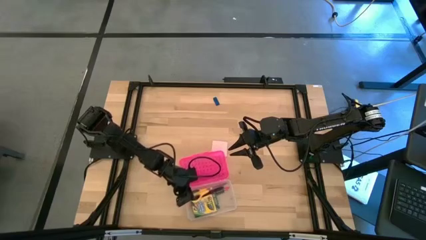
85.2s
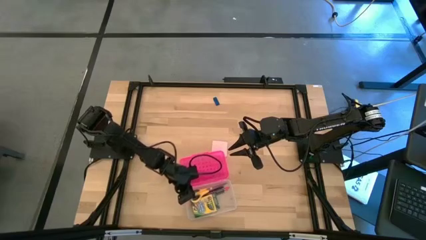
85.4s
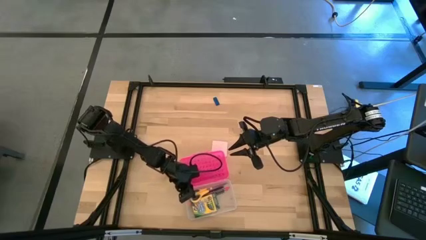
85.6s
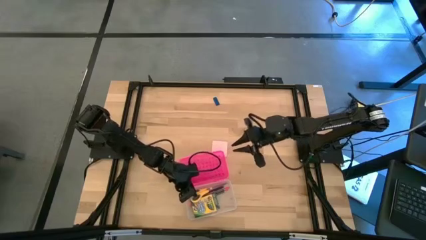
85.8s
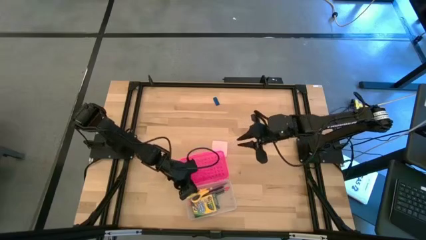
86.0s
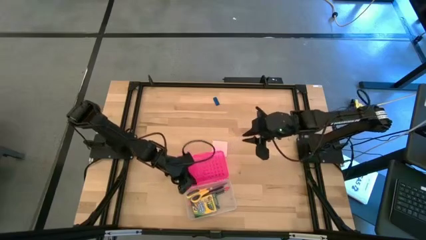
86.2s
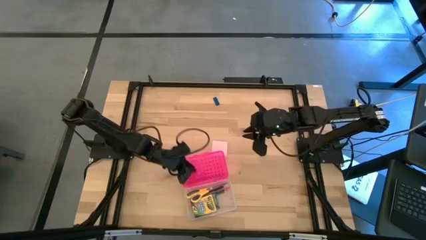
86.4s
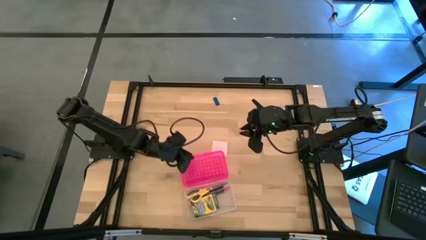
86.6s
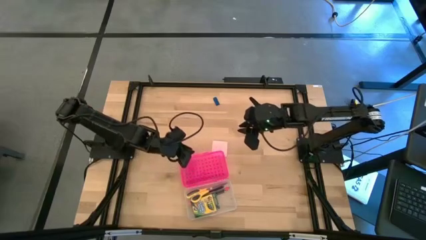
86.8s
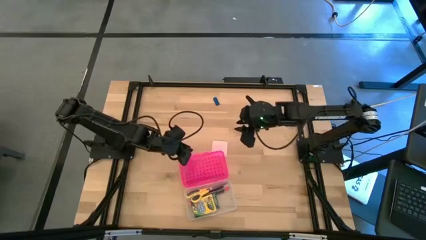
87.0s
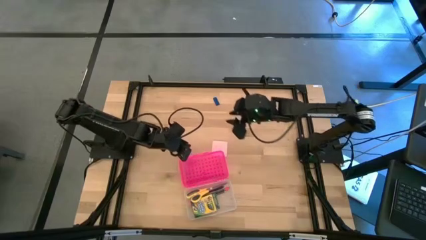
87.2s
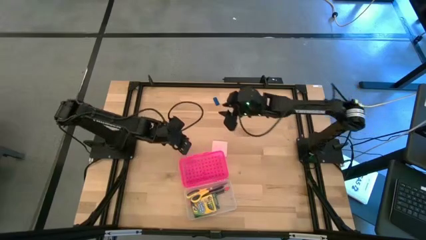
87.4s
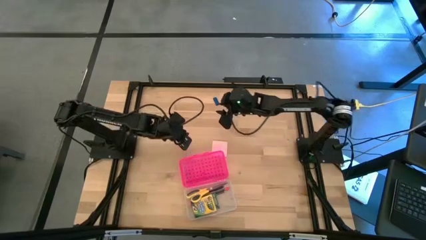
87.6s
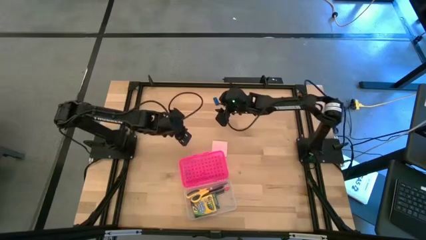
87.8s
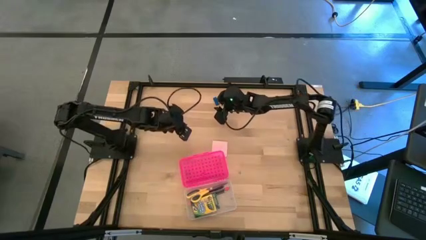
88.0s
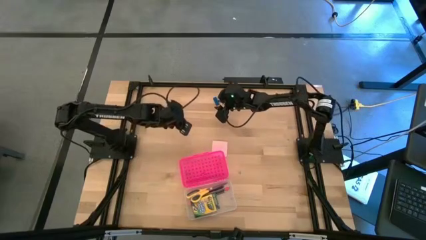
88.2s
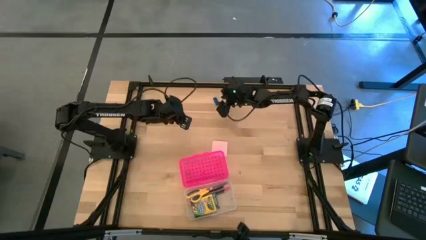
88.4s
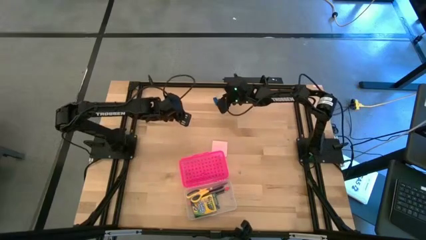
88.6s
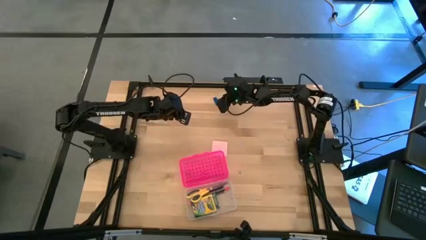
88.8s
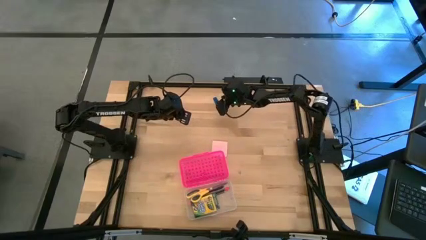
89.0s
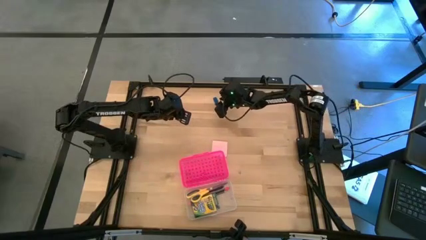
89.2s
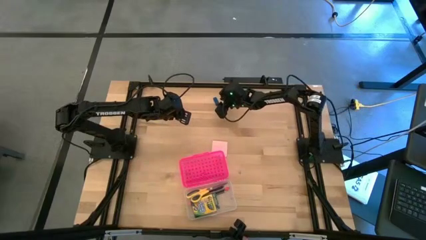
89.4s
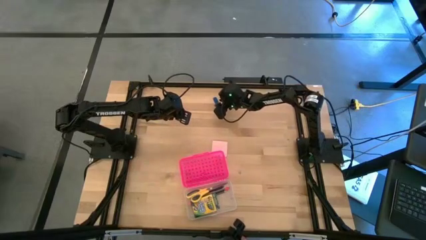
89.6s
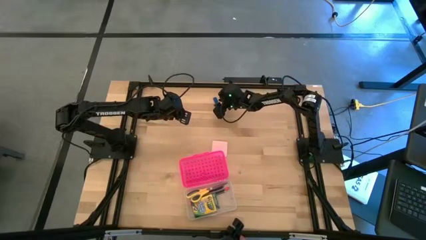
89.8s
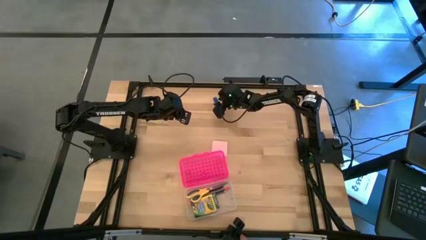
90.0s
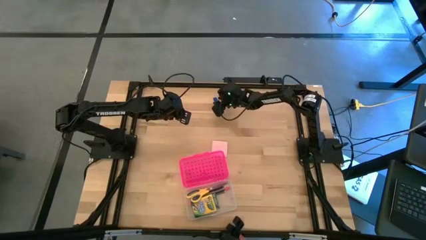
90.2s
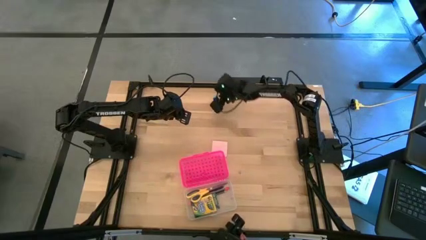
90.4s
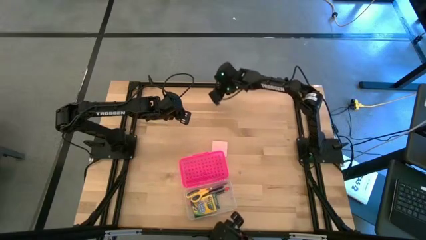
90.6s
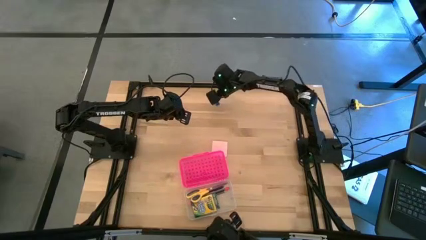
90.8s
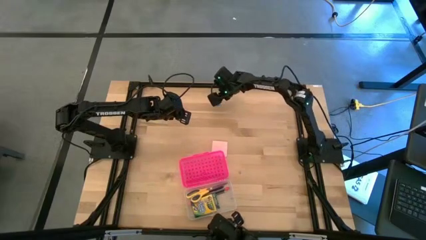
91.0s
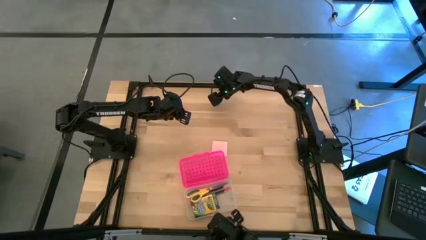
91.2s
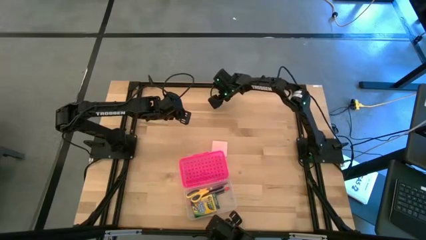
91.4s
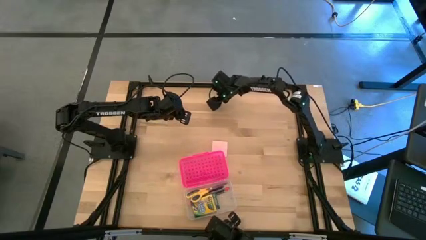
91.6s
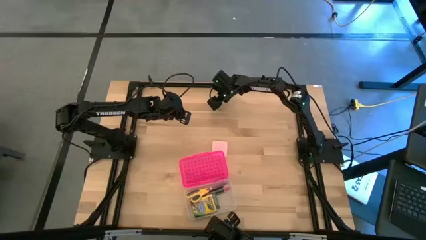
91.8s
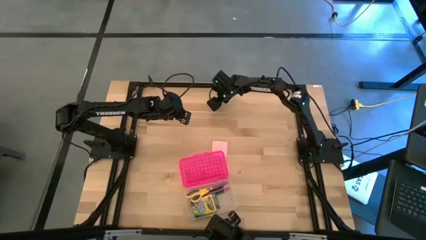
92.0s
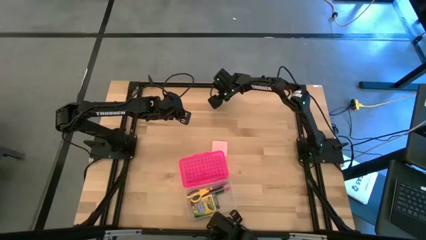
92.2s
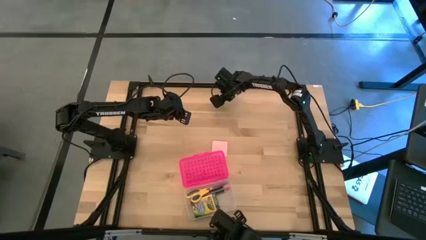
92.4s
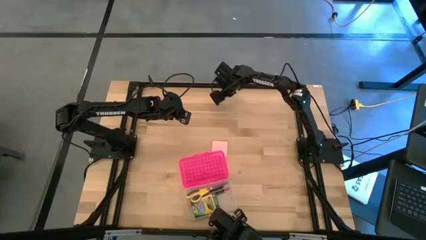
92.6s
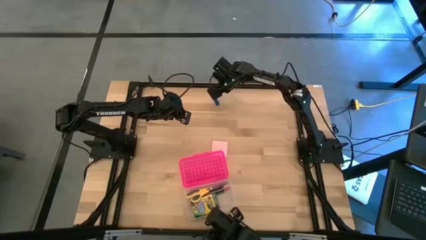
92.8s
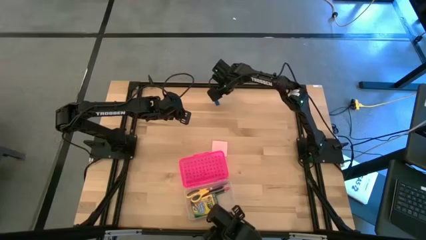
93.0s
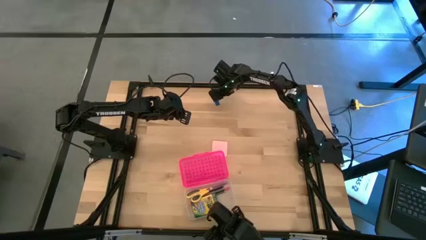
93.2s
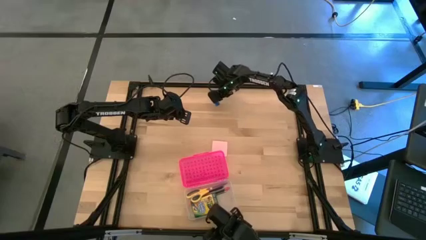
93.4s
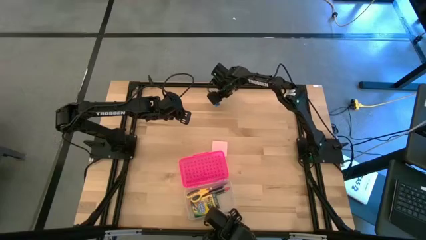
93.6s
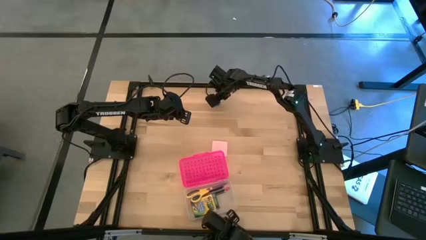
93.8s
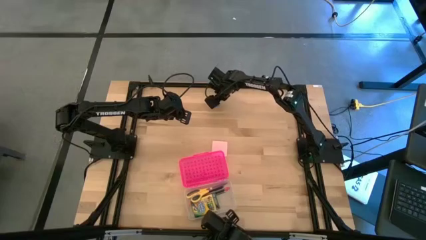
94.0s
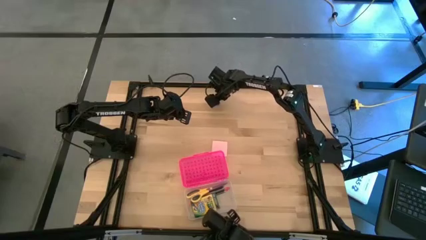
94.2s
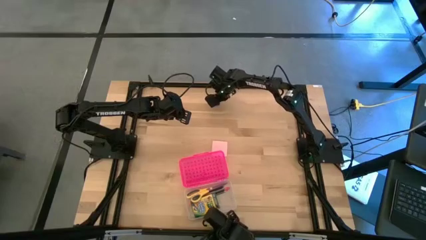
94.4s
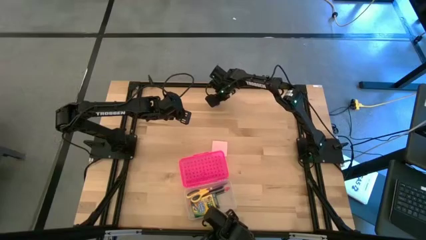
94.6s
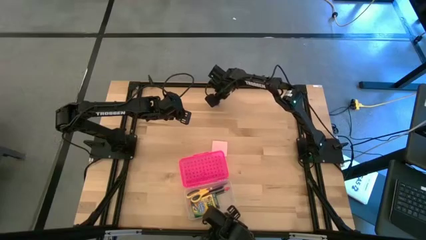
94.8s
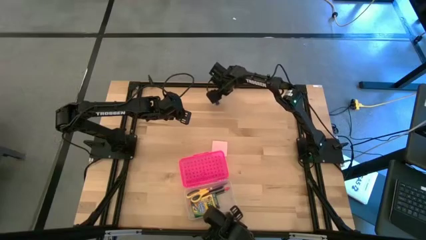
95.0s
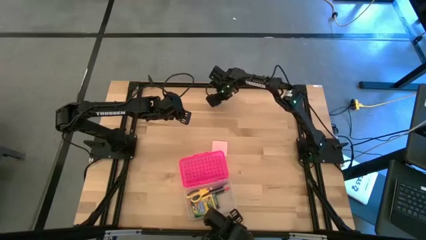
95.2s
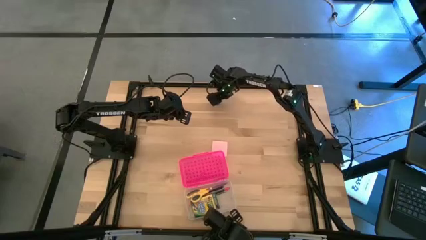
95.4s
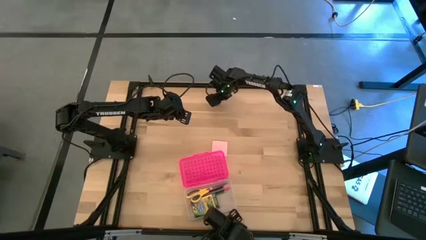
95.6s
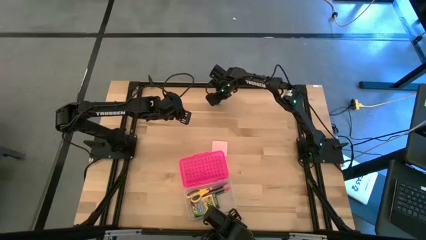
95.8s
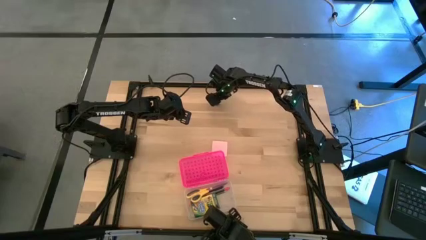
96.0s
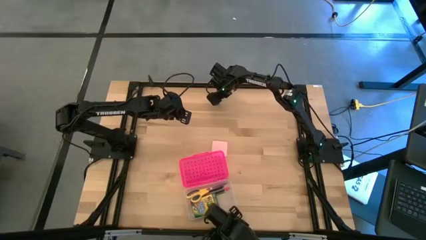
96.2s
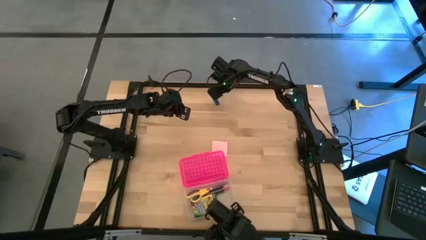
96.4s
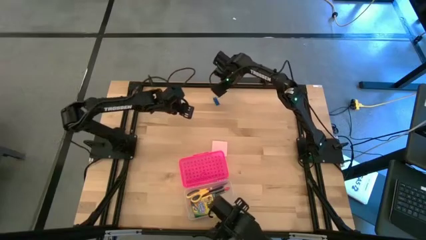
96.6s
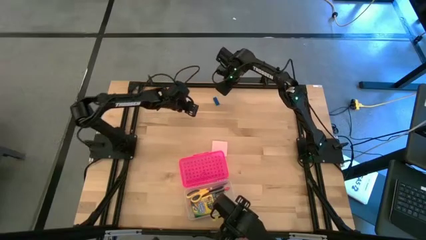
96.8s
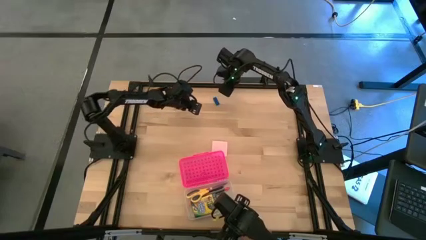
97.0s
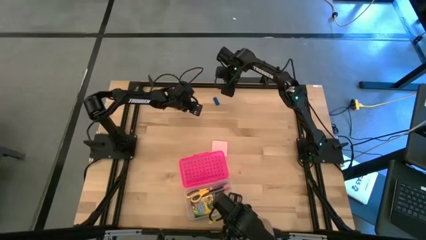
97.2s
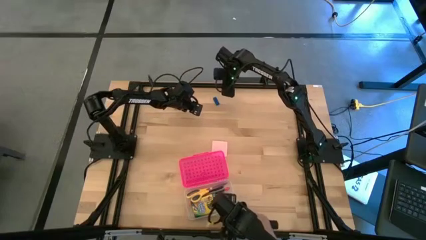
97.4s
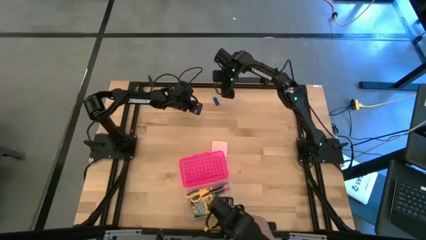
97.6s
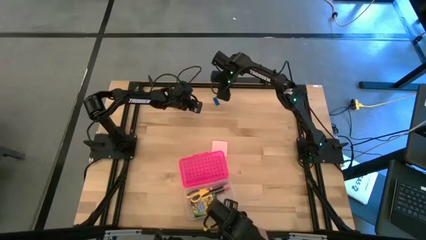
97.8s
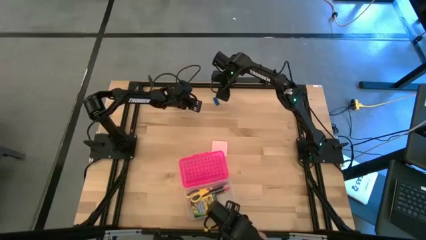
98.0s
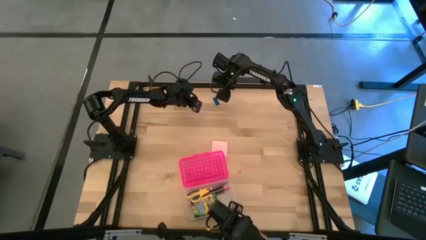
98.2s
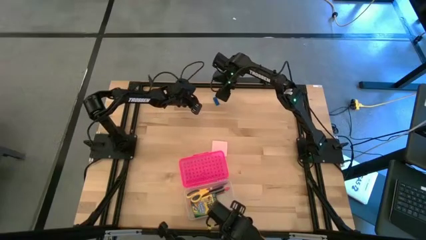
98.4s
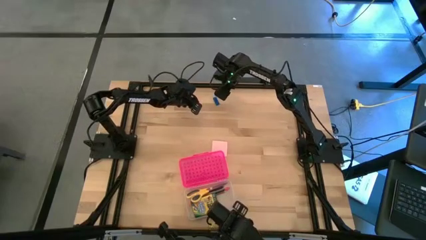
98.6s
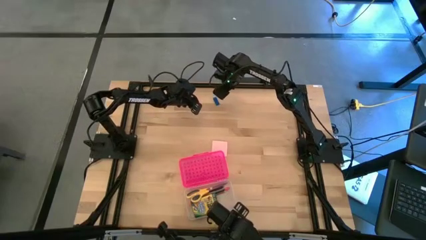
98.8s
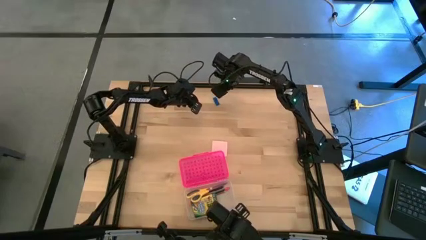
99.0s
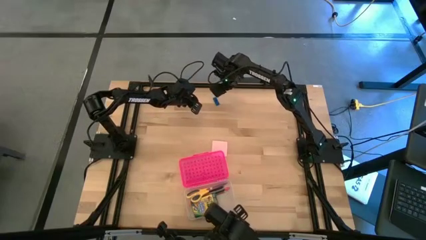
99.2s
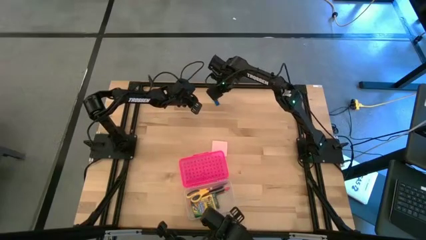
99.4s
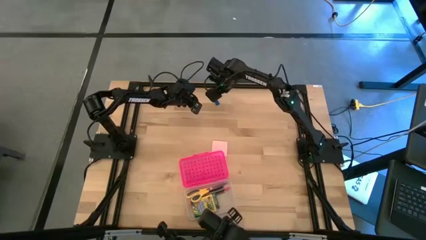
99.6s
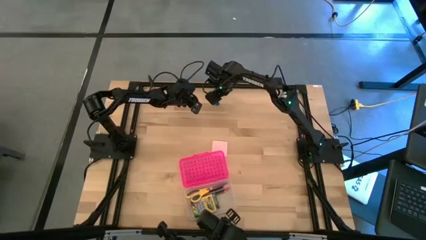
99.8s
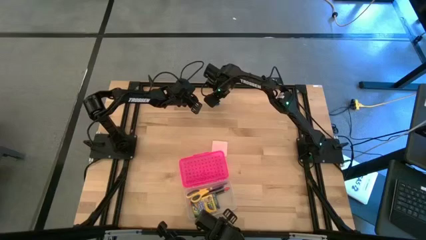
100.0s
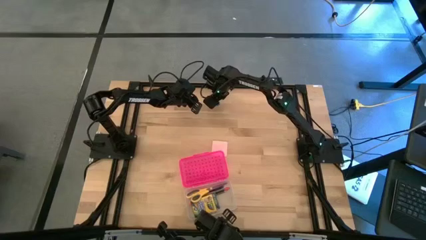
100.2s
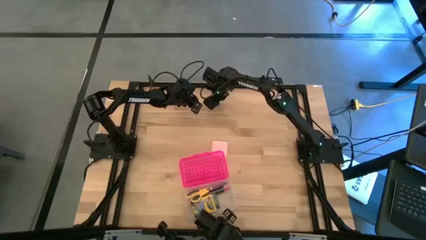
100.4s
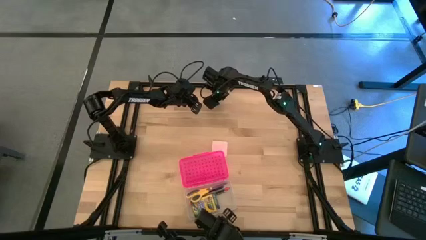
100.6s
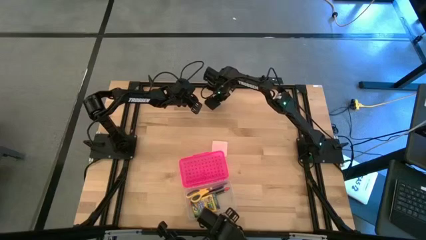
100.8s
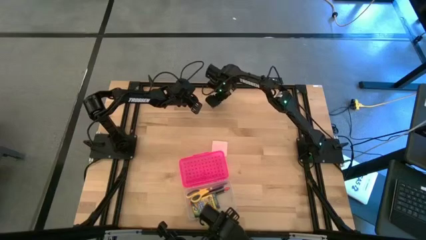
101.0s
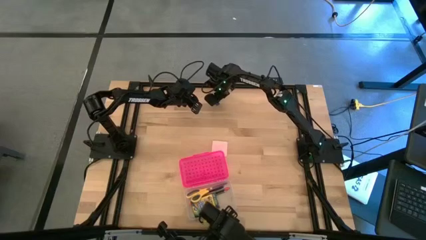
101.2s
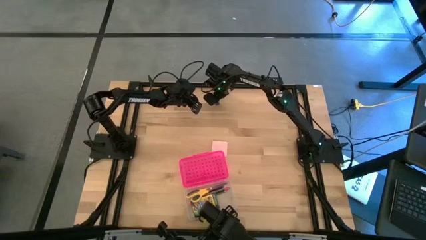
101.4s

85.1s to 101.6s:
Task: Pack school essentials
Put the blue eraser into the pink supply box
